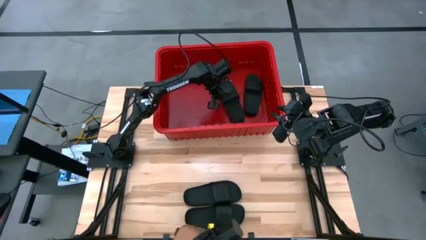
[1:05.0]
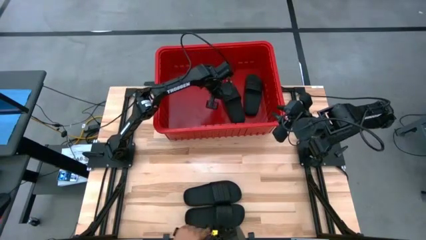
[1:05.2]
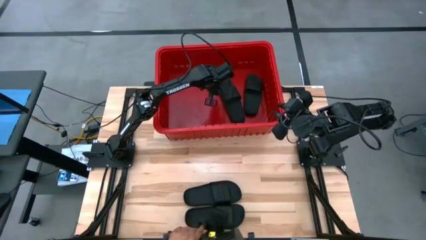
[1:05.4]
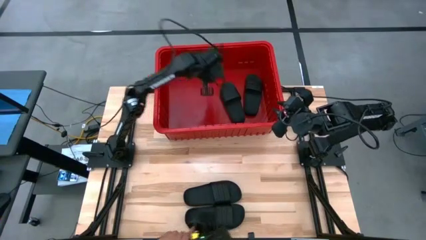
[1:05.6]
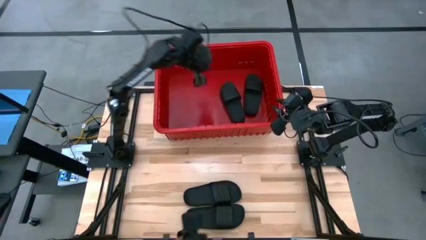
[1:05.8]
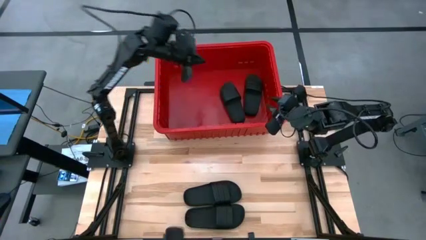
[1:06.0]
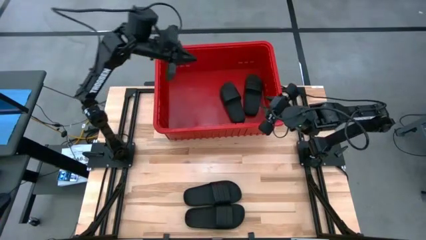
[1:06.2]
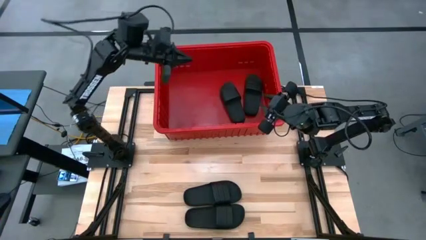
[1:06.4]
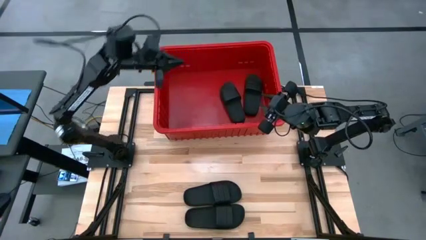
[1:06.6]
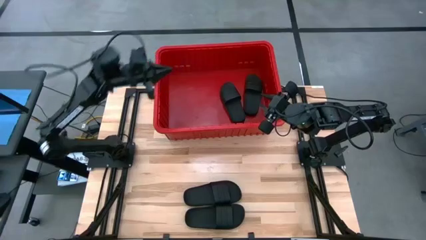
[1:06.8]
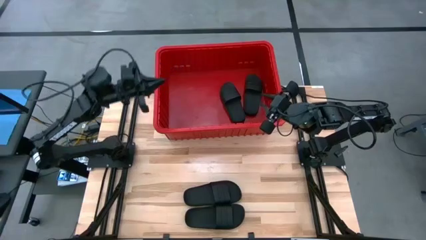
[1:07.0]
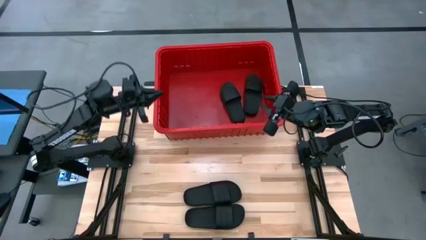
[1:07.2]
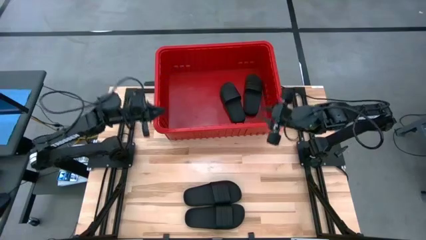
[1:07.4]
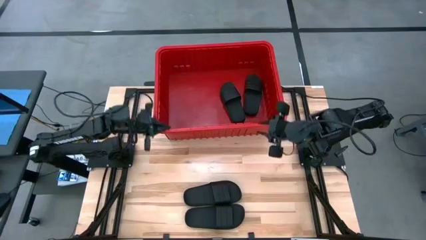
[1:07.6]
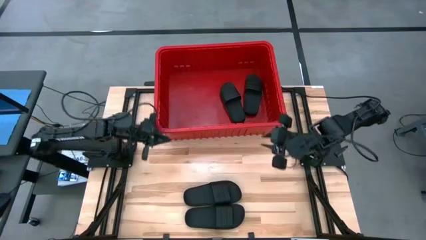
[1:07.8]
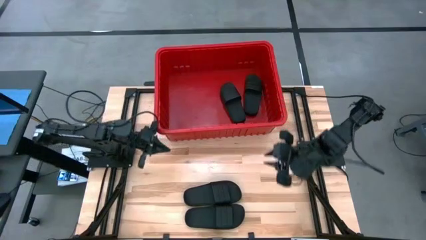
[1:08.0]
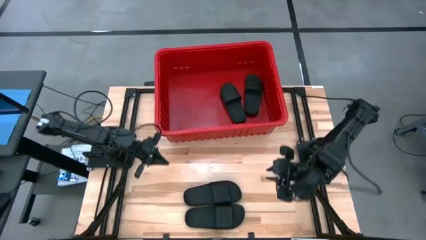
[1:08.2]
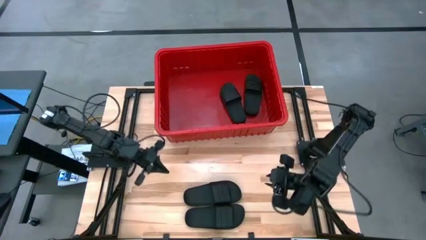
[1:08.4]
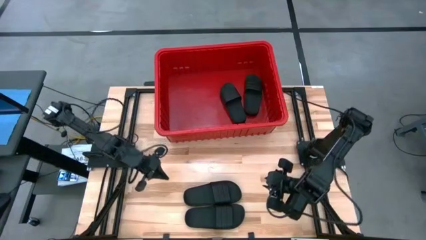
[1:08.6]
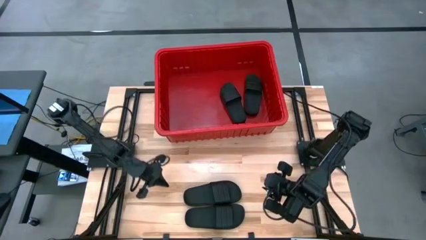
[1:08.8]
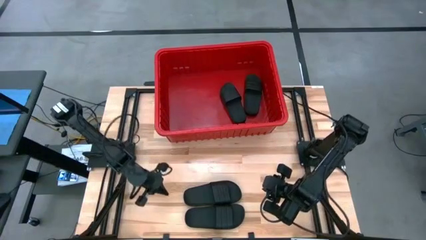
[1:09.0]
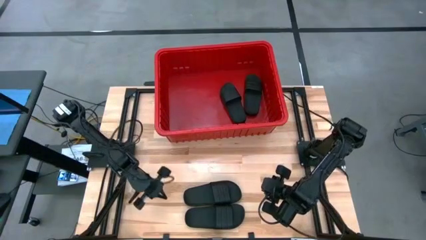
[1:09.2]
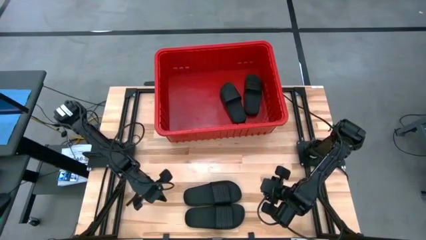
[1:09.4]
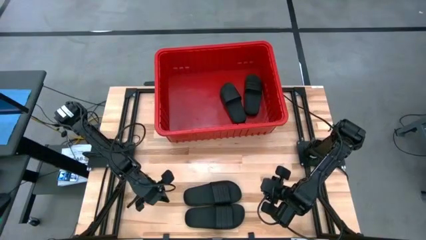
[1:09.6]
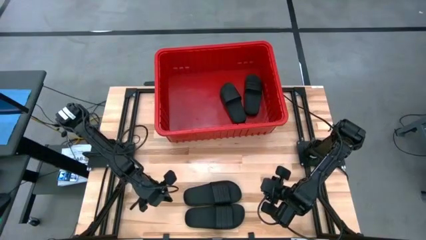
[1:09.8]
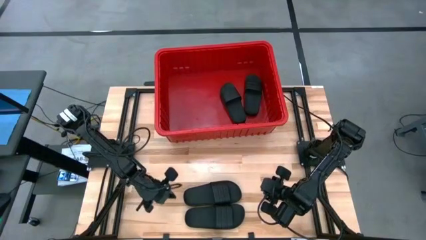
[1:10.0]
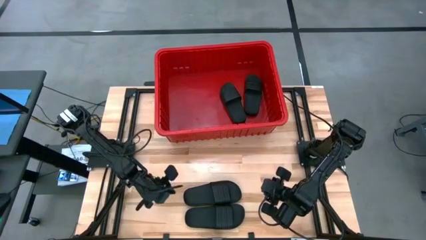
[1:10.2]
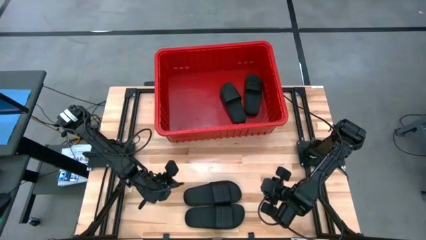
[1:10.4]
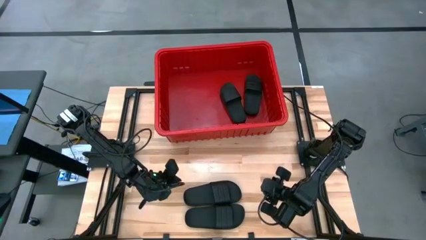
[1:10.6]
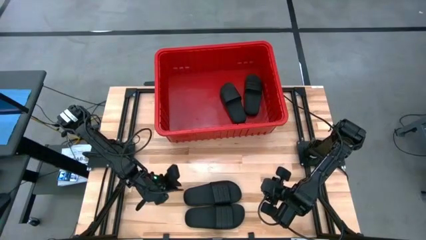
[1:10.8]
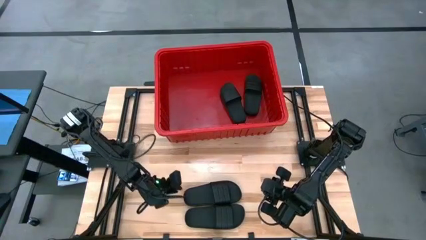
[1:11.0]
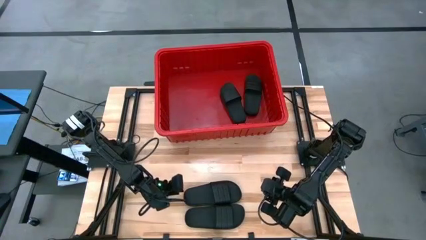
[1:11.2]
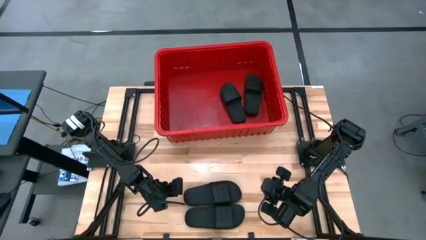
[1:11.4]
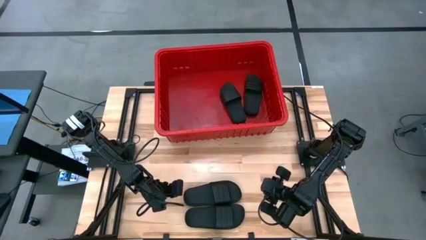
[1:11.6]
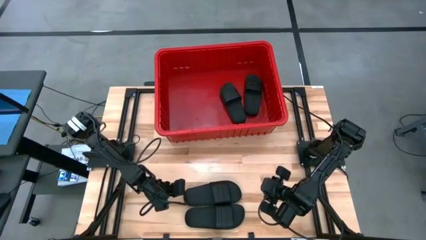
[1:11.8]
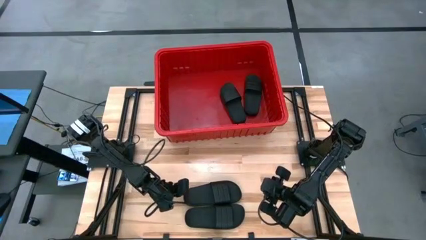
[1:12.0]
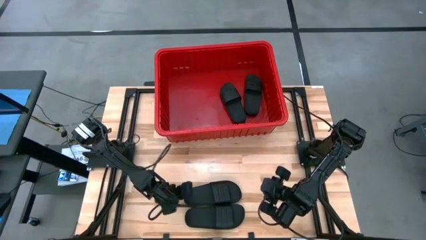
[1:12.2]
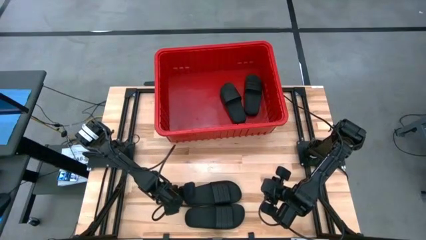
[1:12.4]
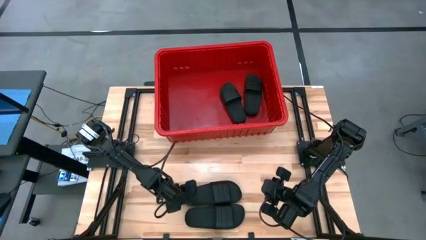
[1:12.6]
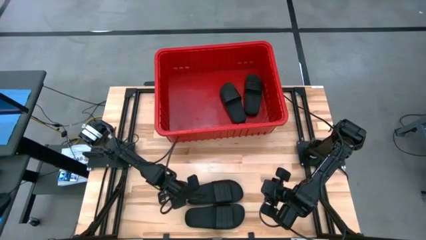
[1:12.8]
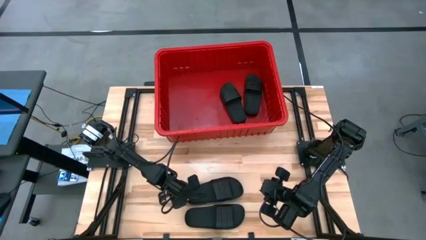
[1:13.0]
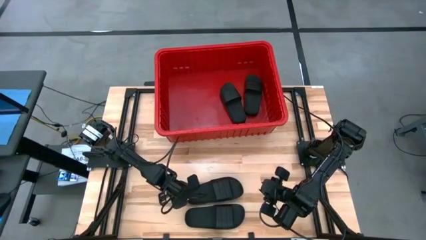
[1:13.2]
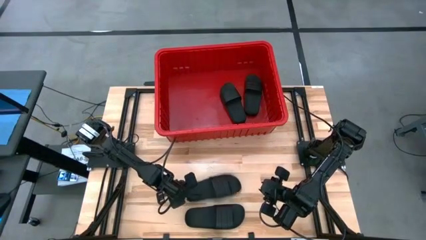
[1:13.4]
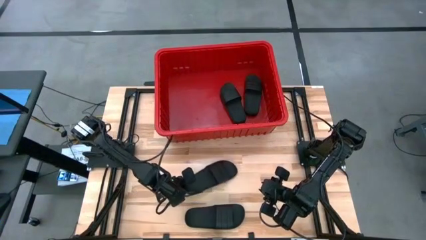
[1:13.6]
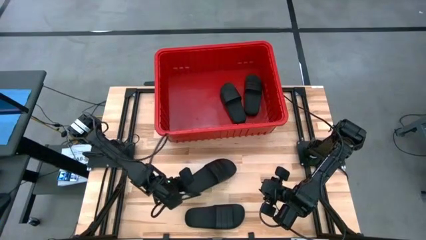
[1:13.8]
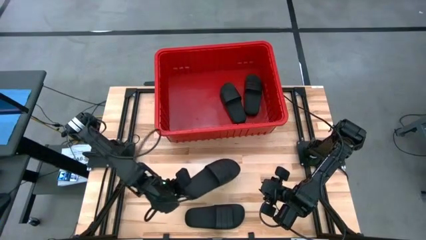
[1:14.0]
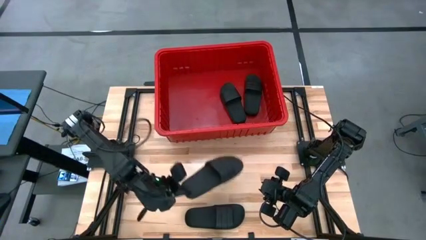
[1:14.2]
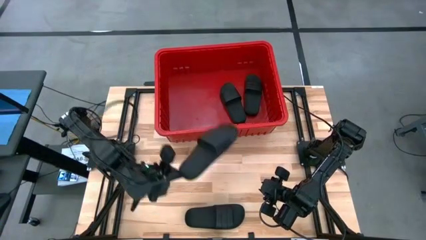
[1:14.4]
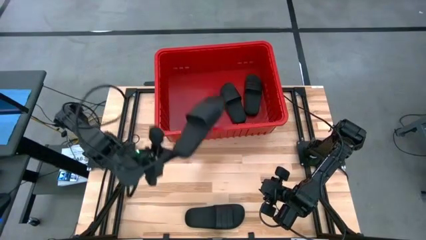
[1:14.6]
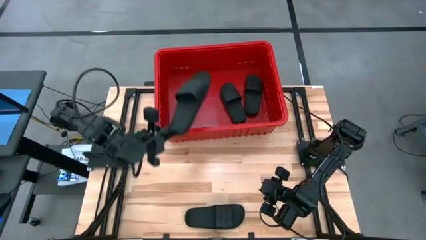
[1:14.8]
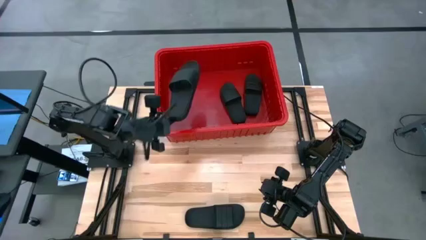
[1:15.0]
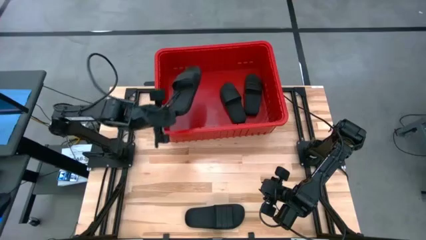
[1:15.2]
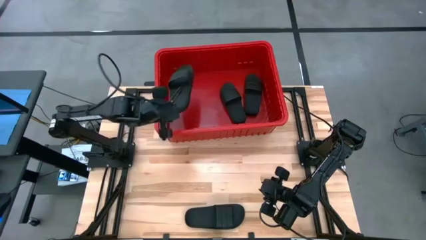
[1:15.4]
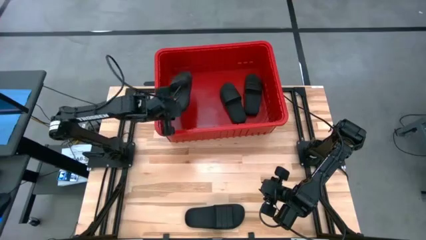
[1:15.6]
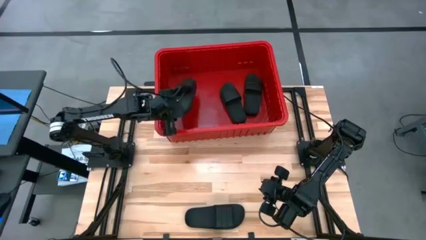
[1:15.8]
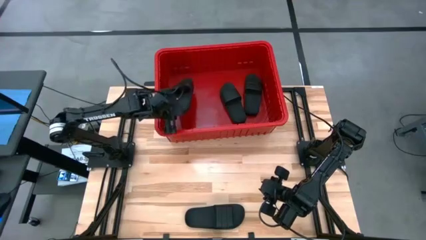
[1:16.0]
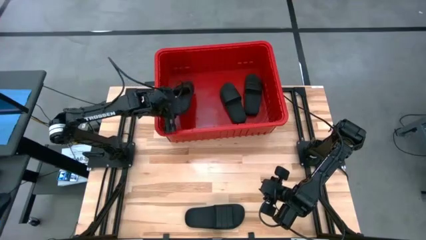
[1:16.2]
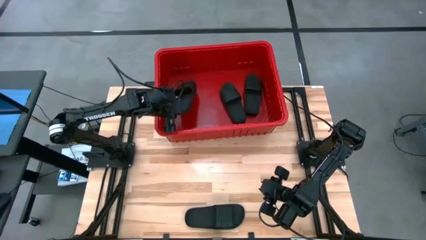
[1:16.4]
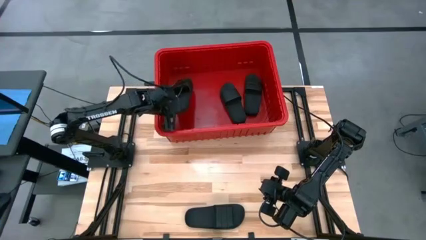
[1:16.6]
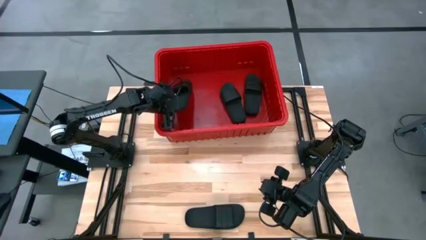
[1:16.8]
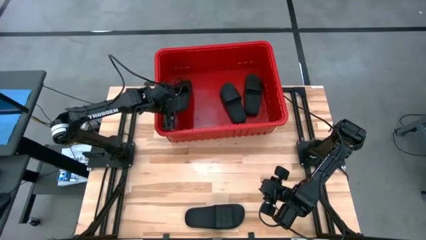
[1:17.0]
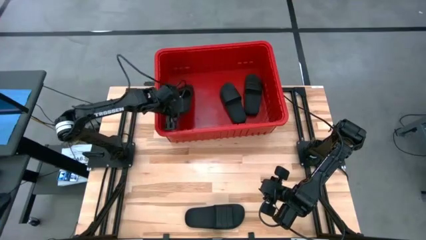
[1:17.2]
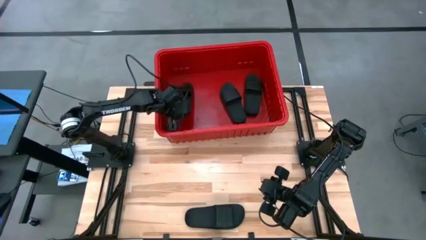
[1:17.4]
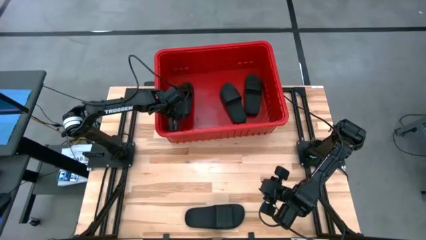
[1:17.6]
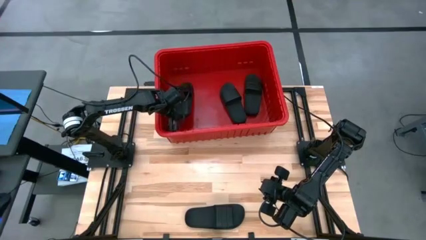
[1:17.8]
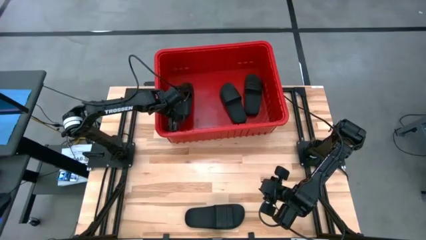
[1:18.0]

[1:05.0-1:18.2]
Task: Pick and place slides into bin
Put the black slide into the container

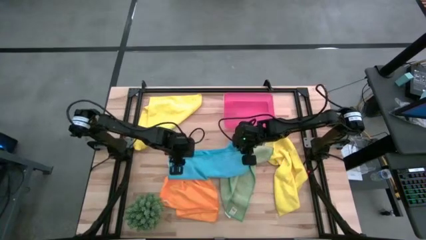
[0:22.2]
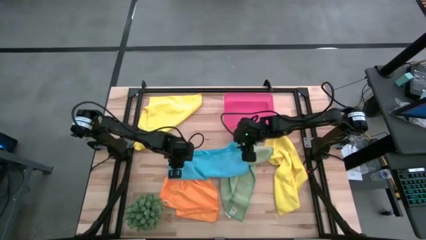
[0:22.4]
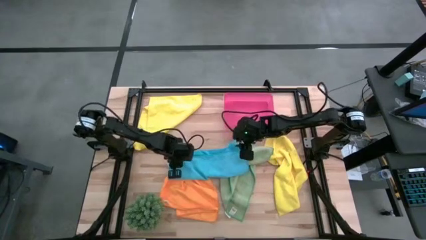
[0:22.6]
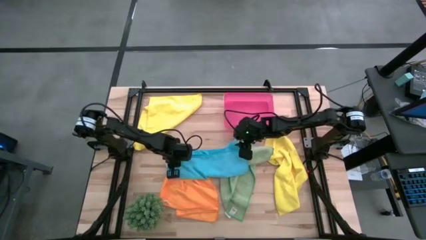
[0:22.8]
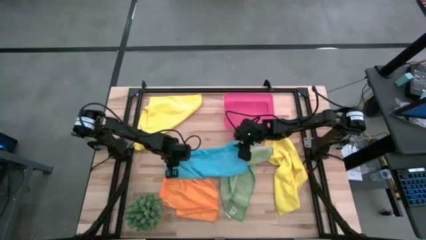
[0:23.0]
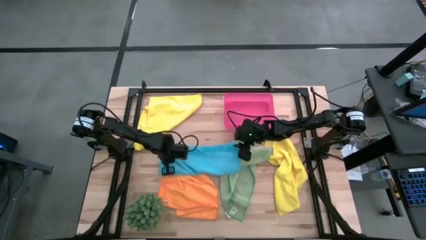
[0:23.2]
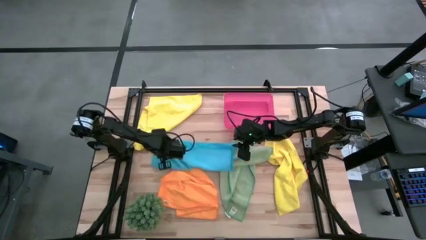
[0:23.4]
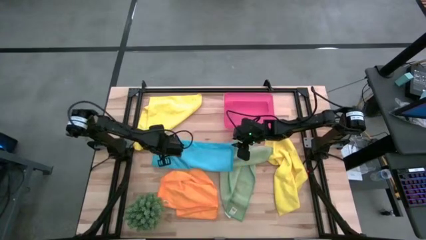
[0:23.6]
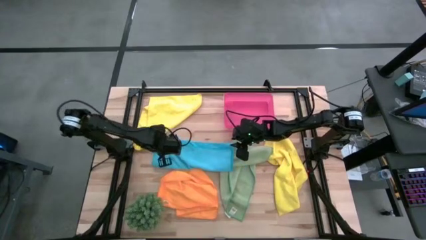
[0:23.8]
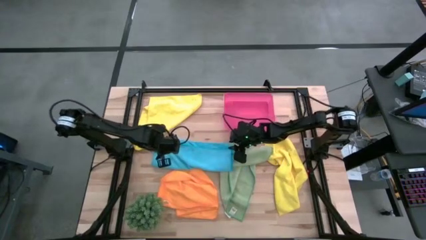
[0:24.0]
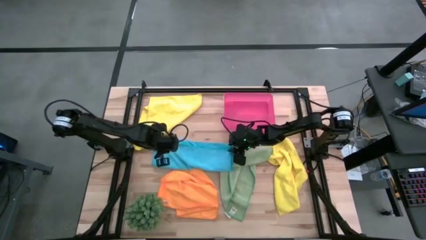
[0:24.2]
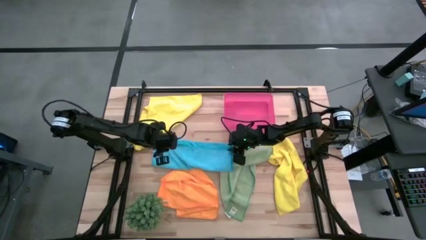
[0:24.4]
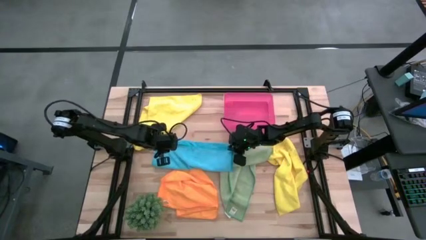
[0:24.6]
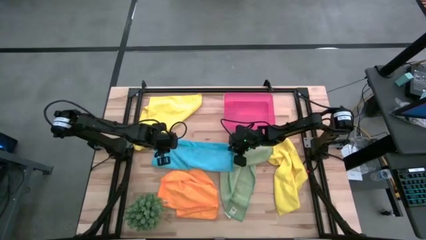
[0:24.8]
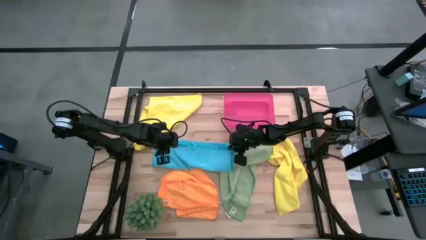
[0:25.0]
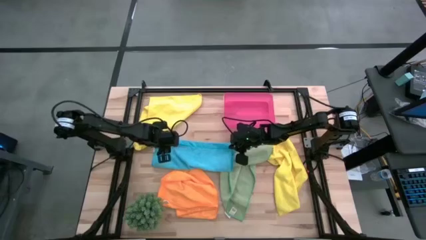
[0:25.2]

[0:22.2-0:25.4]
Task: Fold microfiber towels
Fold the blue microfiber cloth
